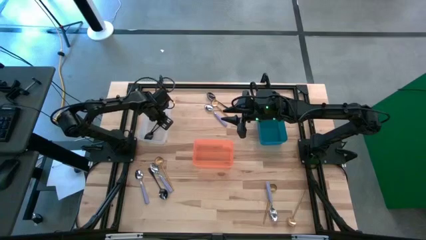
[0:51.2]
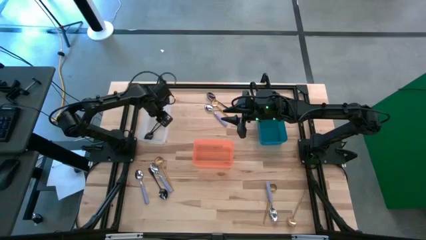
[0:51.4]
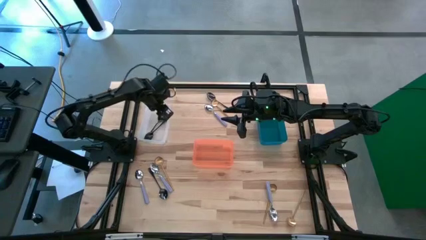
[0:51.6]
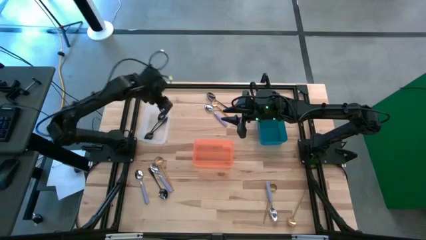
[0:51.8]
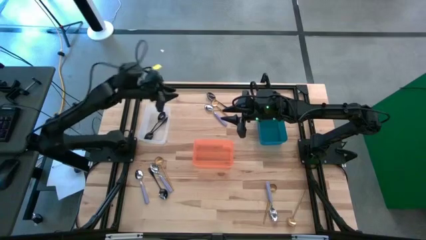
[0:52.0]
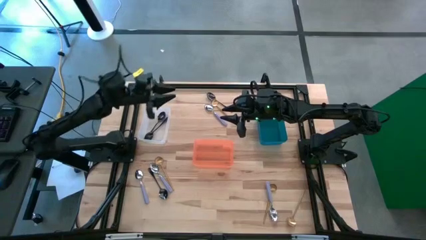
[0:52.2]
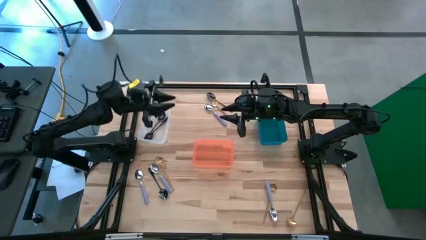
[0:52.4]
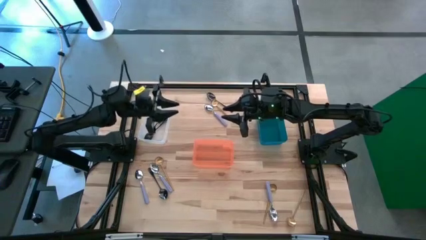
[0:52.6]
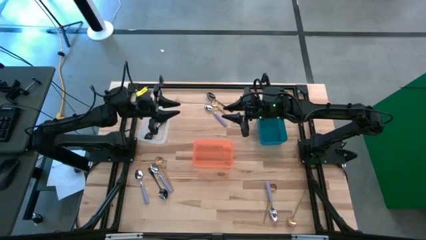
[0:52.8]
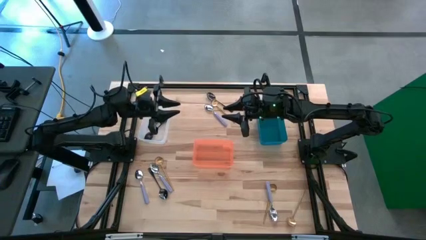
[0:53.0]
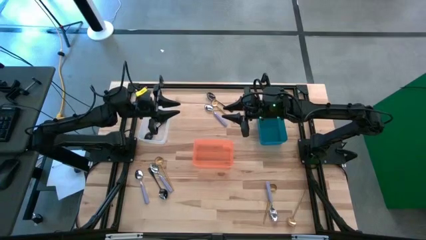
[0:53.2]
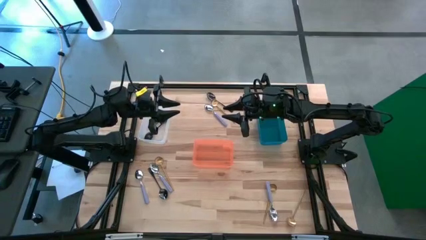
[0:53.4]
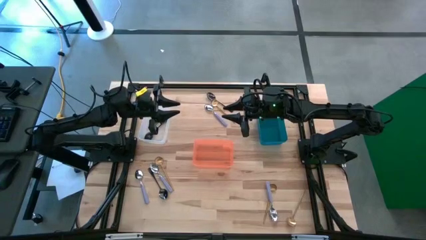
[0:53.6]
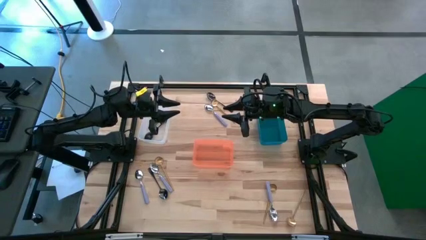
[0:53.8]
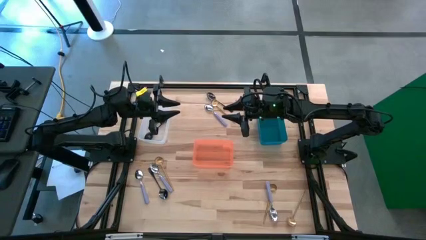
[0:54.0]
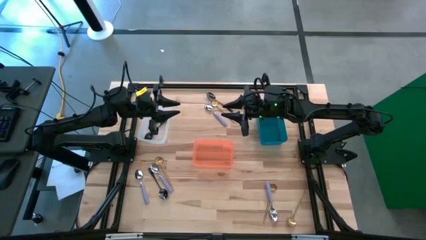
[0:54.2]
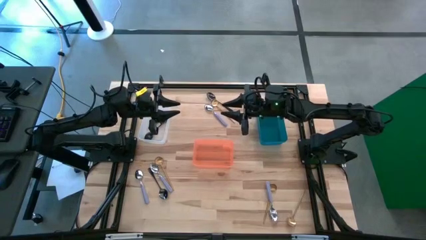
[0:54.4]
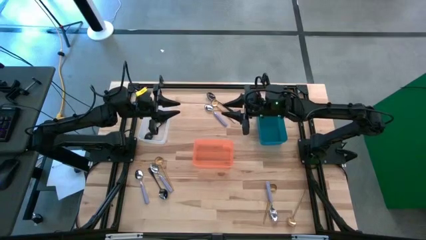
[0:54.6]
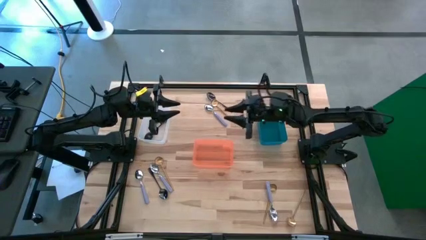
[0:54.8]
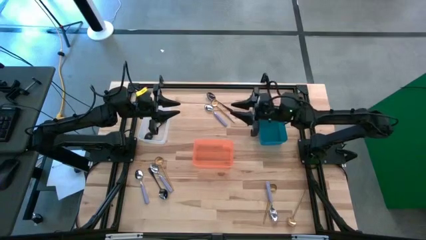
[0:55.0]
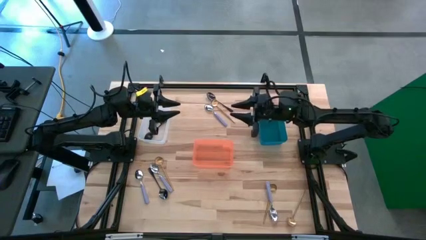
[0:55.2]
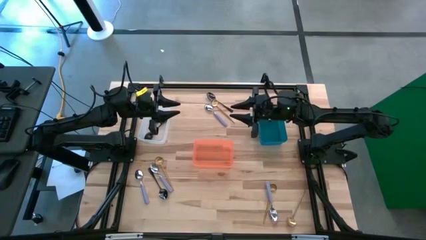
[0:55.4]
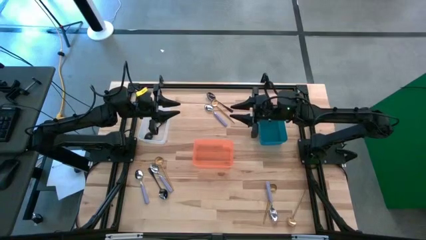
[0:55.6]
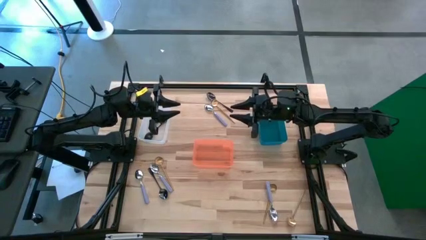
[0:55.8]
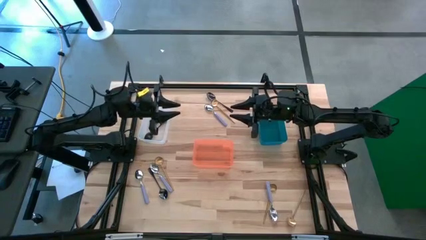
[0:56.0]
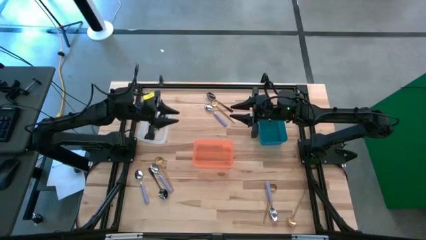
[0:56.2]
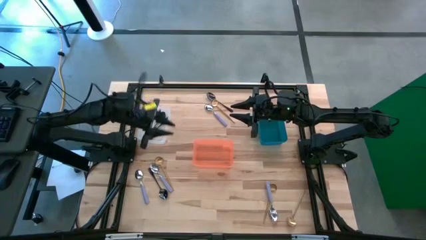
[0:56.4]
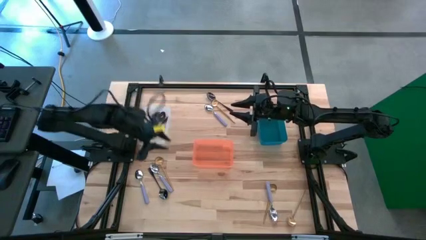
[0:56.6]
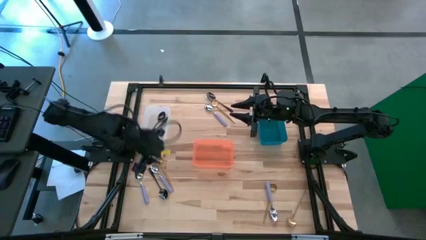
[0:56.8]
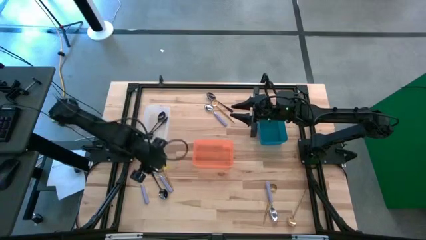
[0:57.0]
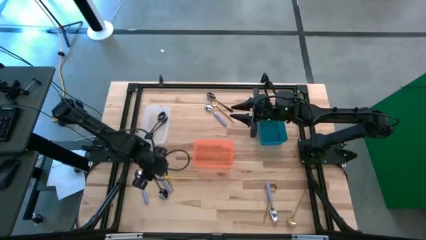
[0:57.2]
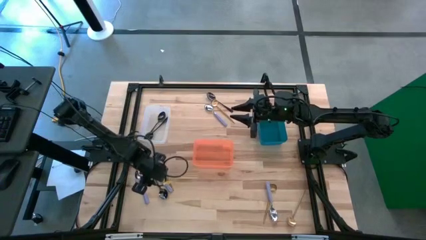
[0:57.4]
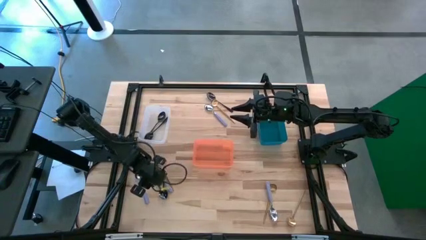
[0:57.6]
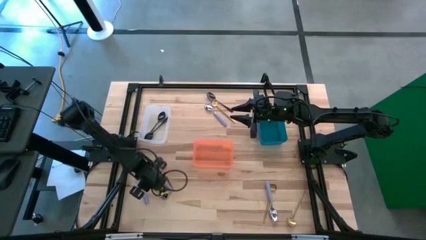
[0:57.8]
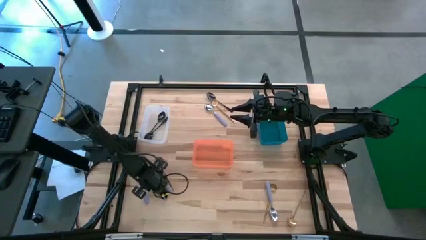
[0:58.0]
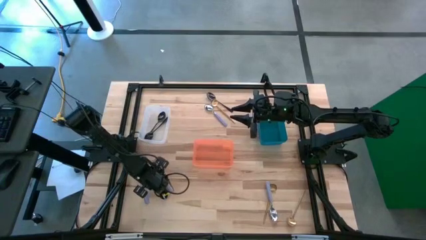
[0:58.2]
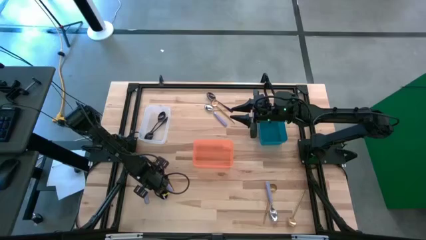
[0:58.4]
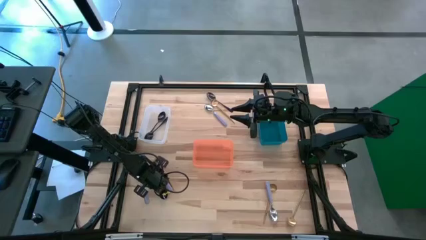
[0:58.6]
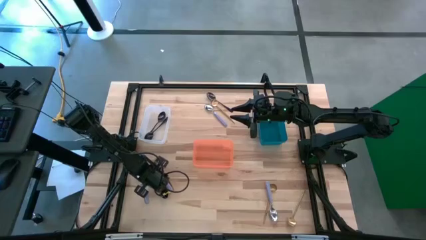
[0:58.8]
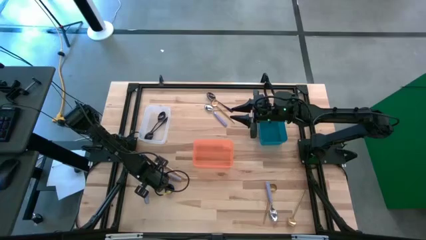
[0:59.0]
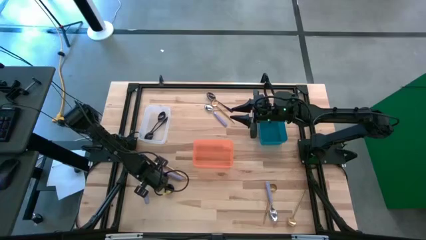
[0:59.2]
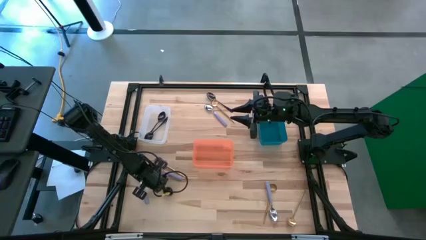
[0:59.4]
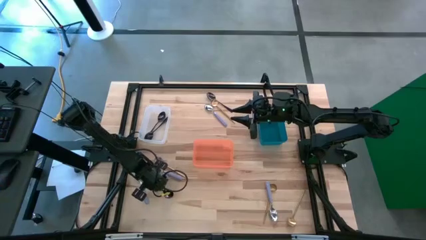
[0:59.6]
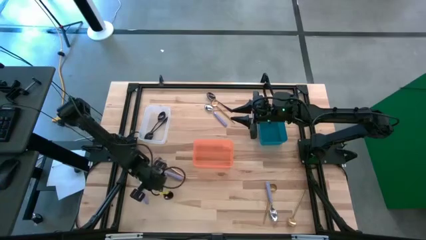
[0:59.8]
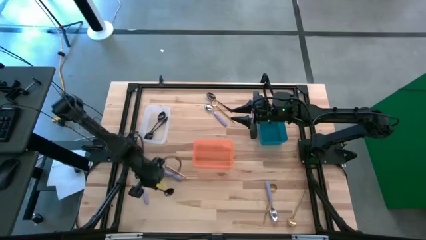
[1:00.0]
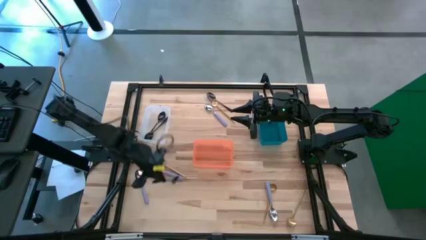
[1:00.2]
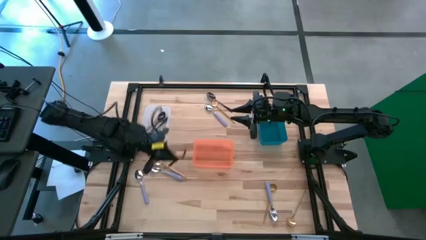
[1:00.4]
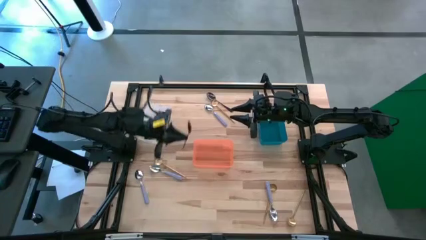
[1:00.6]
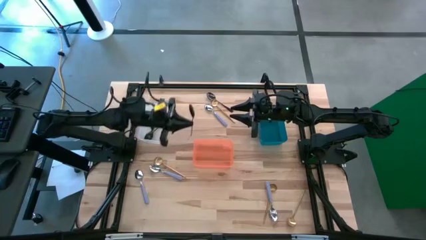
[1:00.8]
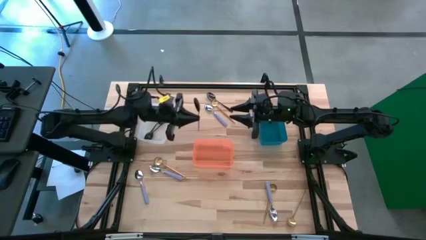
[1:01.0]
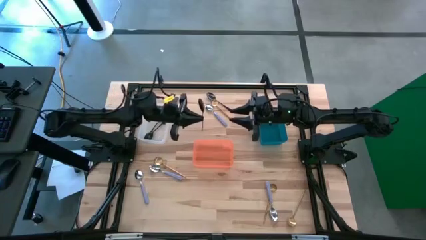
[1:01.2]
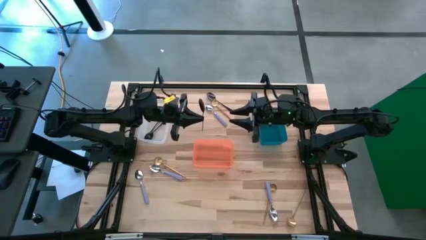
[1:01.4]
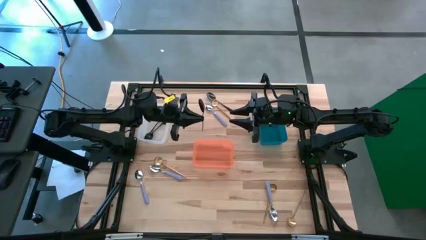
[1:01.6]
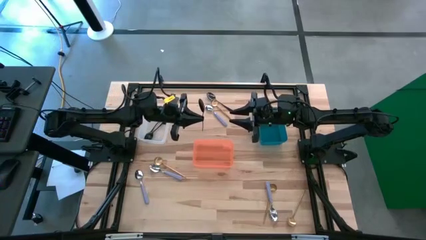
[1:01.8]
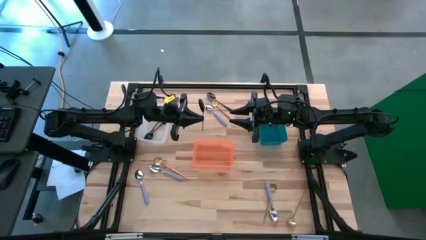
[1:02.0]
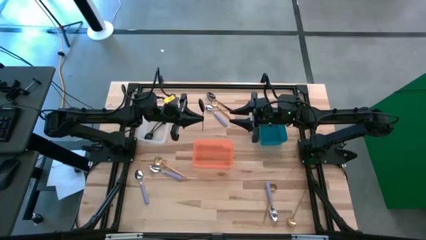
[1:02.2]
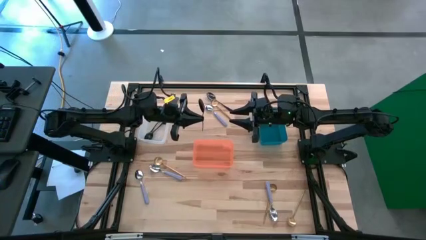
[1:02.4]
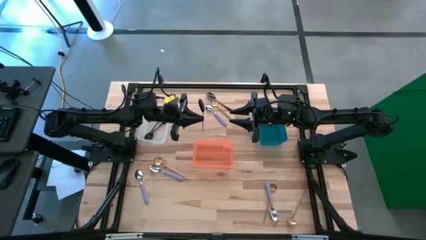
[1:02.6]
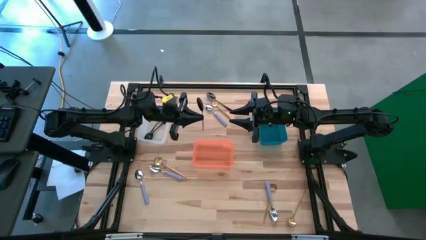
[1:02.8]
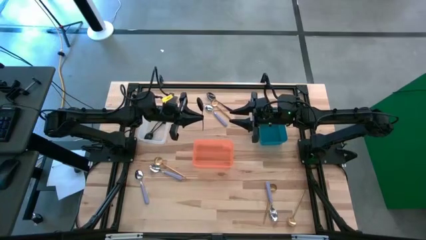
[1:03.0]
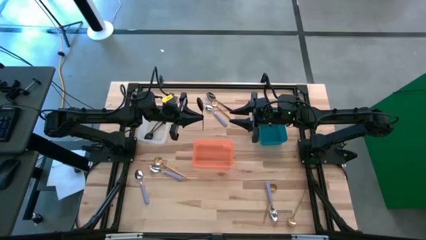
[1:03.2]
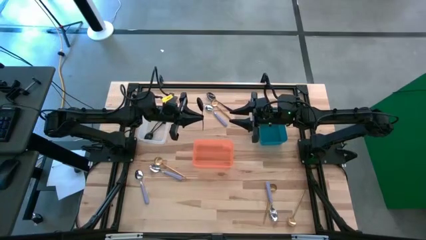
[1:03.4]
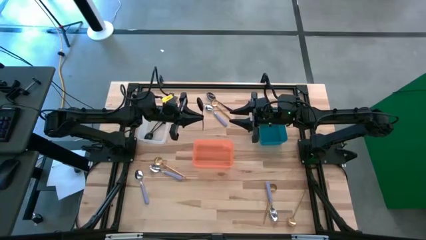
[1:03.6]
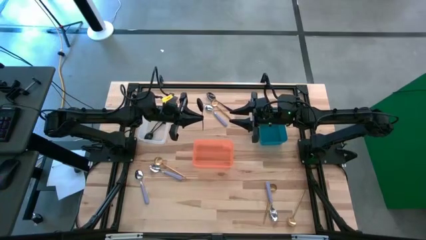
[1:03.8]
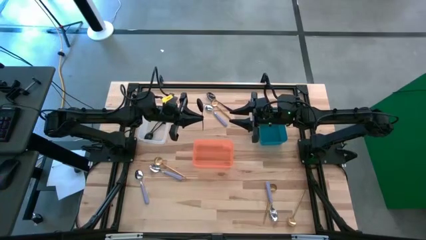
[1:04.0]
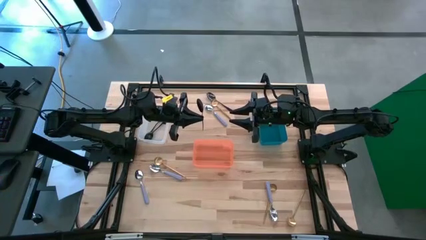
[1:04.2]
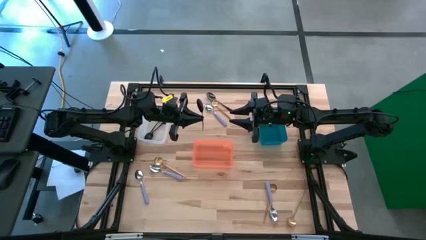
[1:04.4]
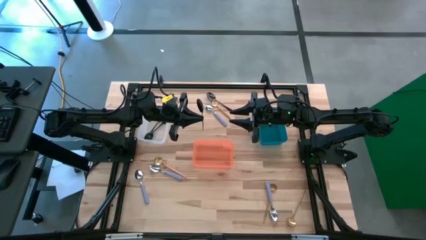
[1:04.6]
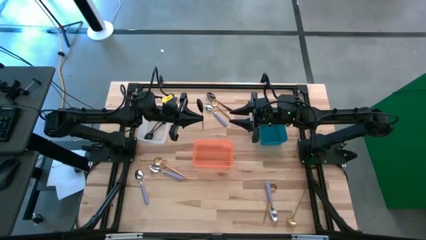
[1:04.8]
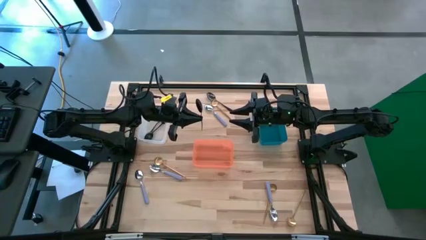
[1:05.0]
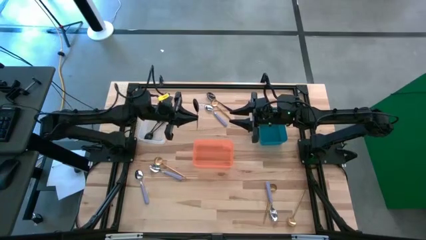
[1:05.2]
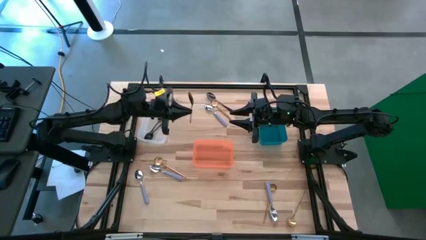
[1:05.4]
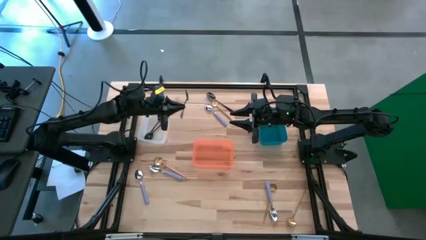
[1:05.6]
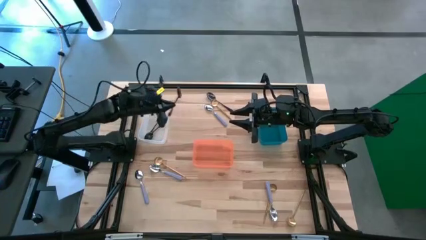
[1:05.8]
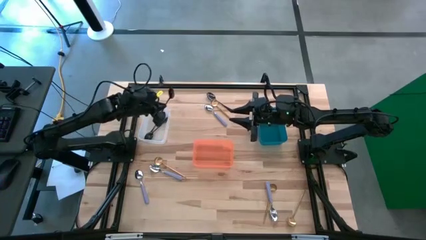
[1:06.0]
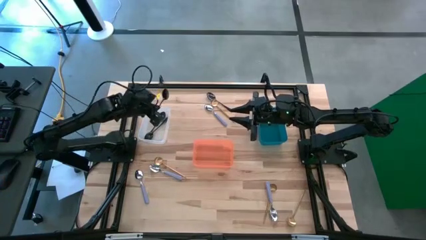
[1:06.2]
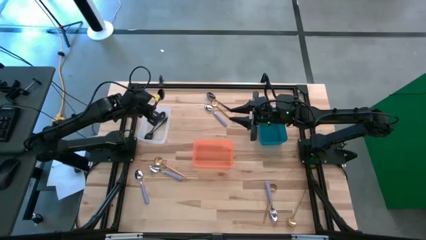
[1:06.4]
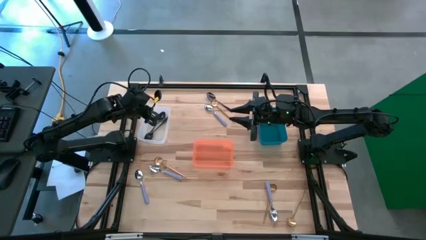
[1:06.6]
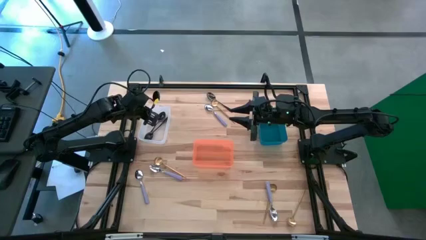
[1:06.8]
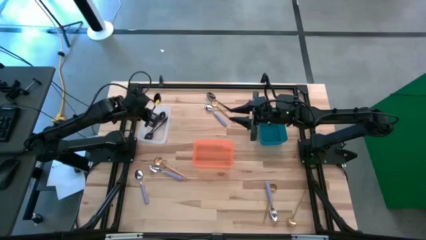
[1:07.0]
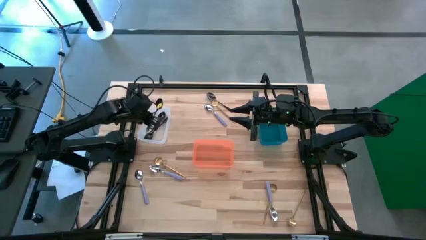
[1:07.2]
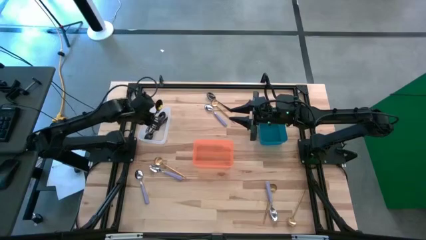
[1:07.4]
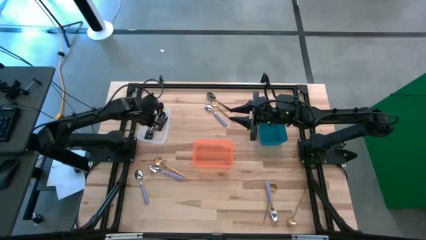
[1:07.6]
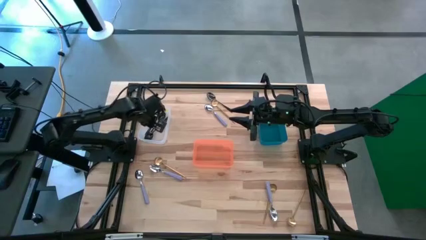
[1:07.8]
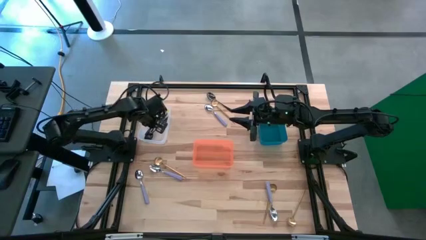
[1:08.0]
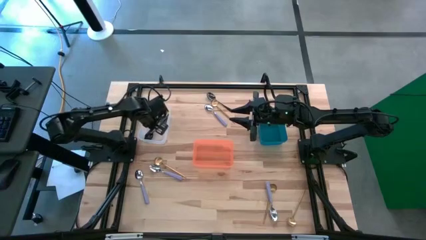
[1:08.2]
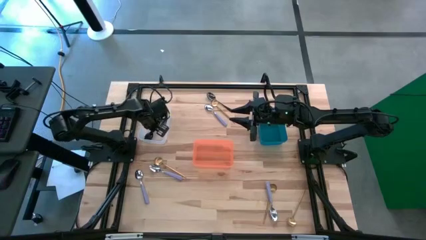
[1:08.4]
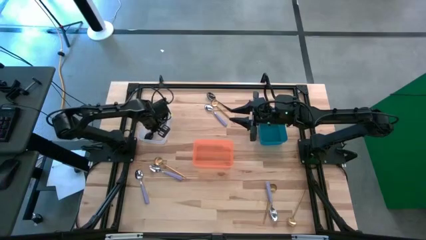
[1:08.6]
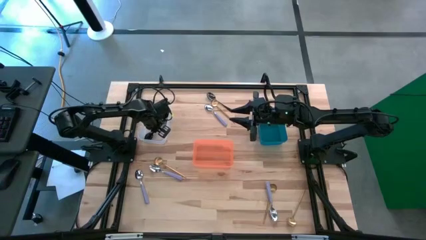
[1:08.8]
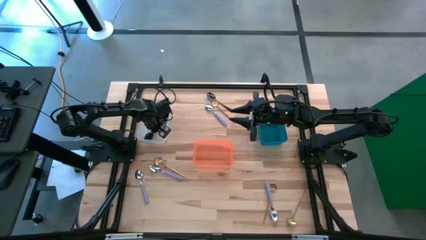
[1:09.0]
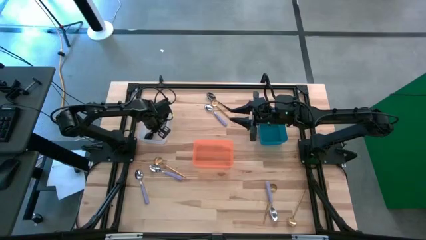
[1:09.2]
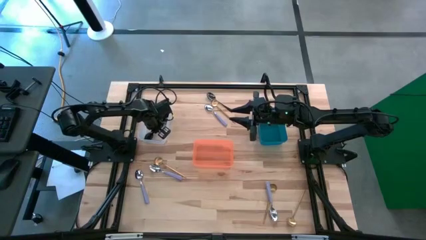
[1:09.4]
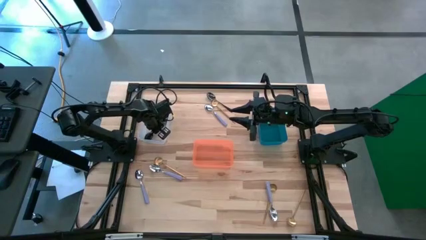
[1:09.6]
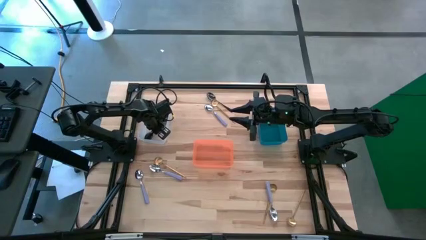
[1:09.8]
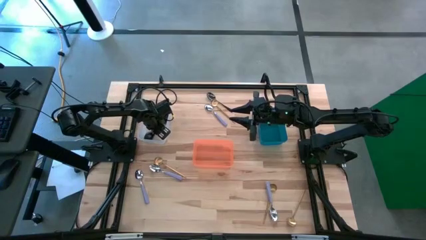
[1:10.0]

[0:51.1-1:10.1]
Task: Sort silverware by color (type)
Put the bottom black spoon into the white bin
